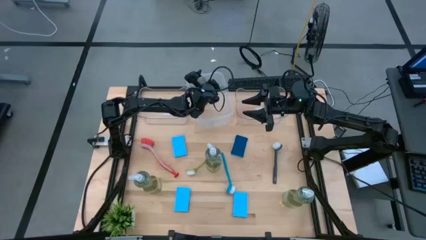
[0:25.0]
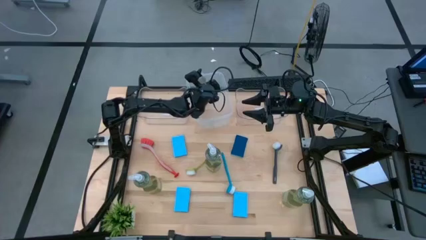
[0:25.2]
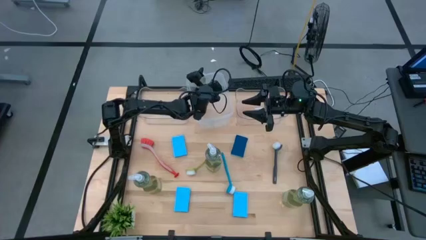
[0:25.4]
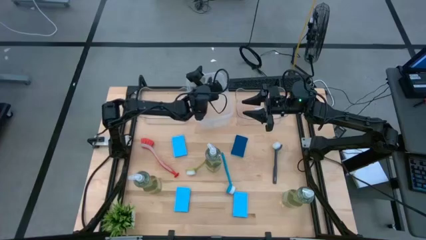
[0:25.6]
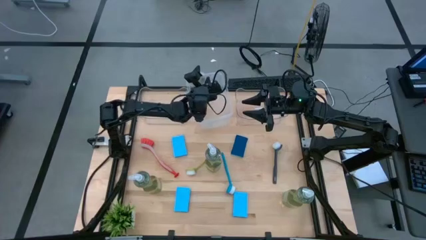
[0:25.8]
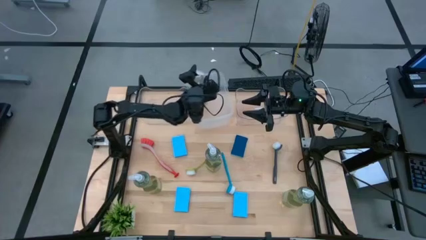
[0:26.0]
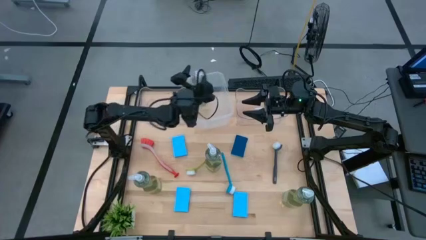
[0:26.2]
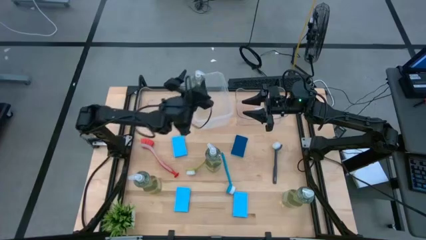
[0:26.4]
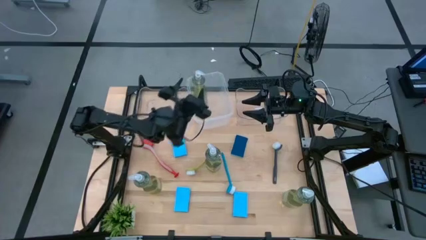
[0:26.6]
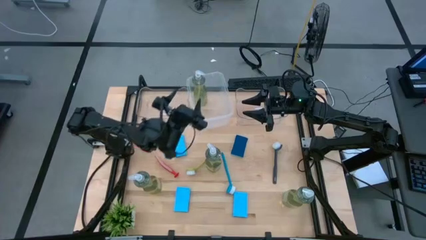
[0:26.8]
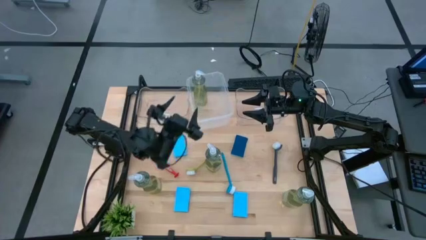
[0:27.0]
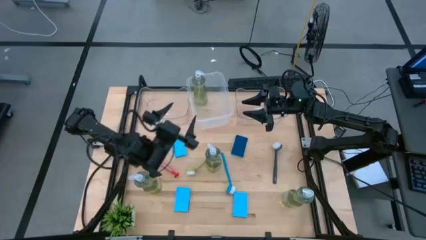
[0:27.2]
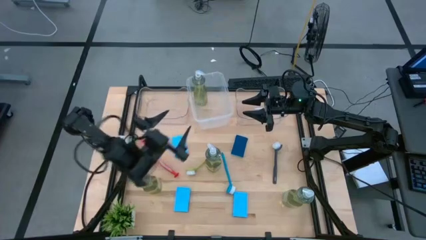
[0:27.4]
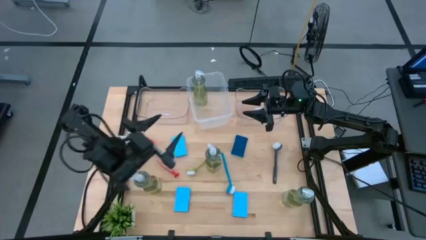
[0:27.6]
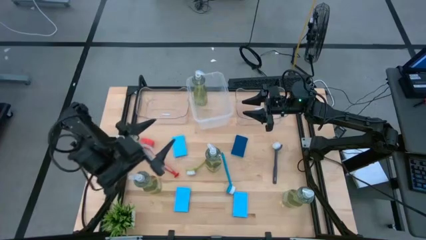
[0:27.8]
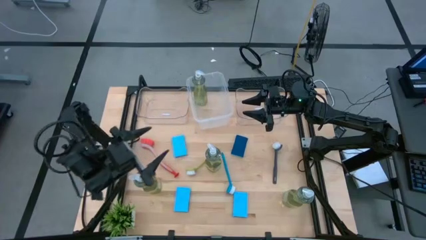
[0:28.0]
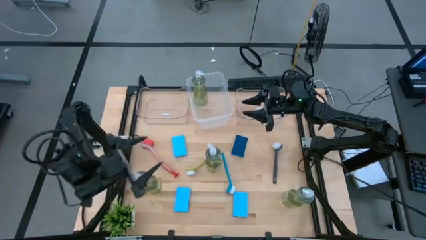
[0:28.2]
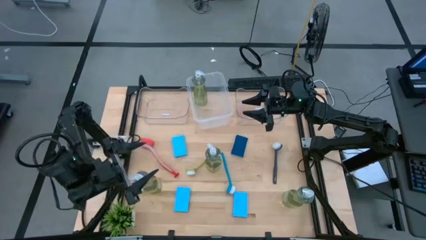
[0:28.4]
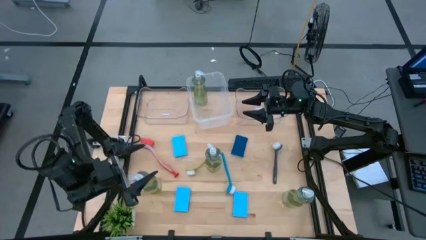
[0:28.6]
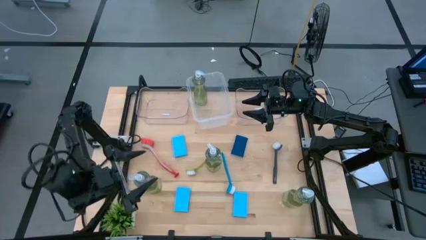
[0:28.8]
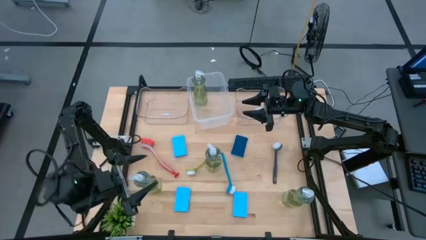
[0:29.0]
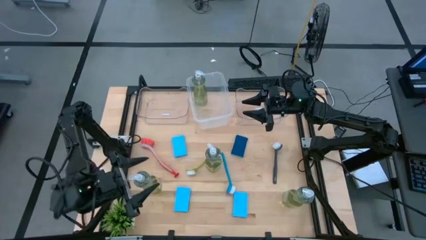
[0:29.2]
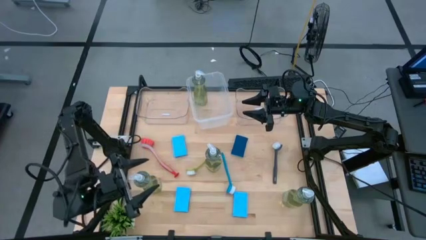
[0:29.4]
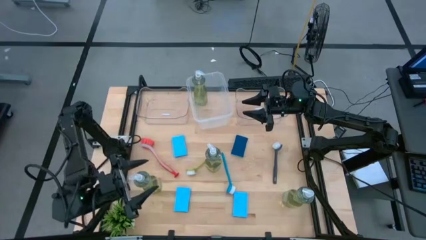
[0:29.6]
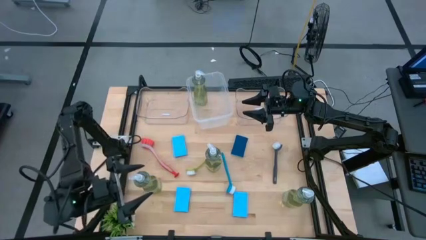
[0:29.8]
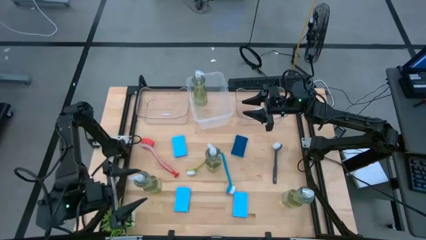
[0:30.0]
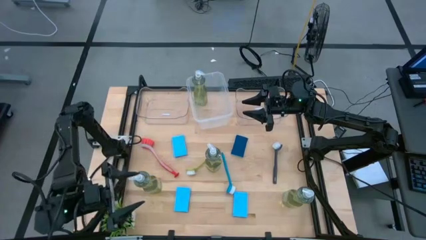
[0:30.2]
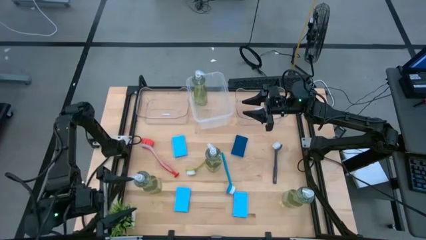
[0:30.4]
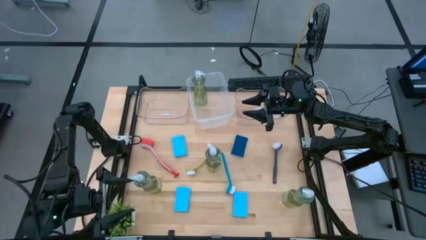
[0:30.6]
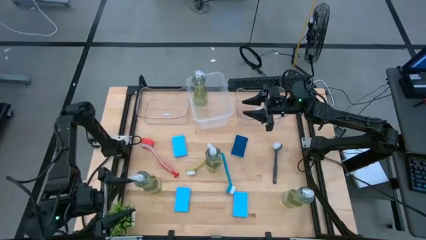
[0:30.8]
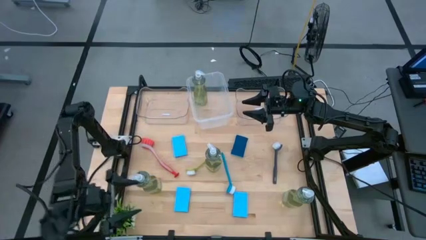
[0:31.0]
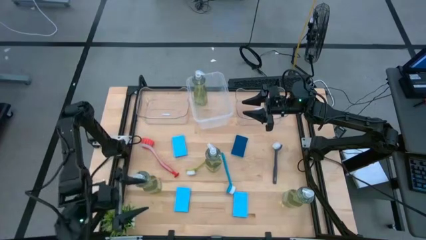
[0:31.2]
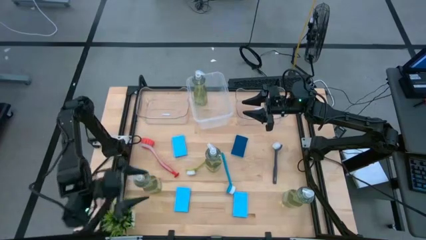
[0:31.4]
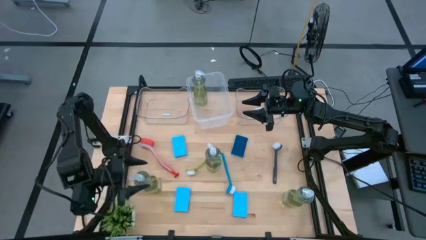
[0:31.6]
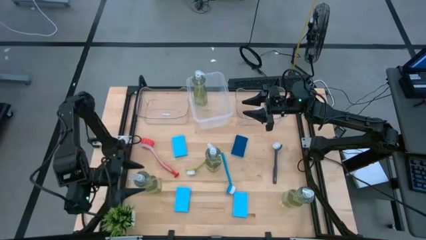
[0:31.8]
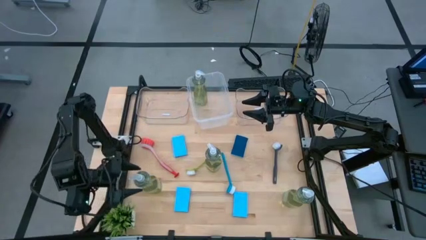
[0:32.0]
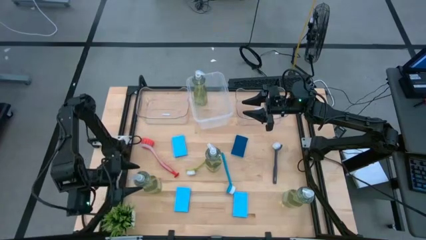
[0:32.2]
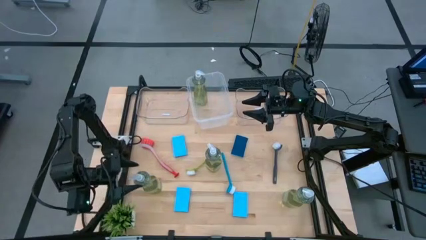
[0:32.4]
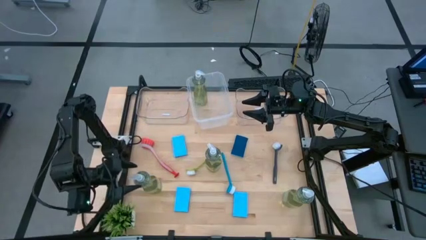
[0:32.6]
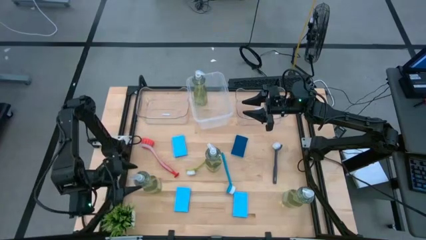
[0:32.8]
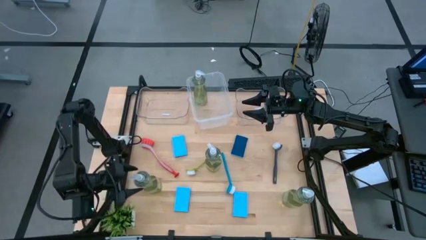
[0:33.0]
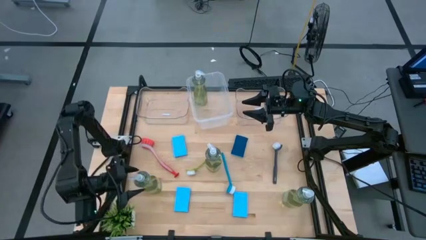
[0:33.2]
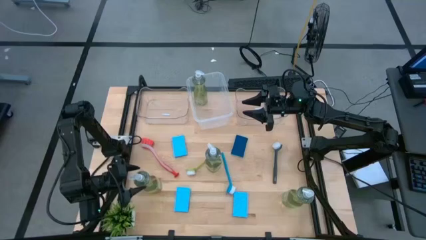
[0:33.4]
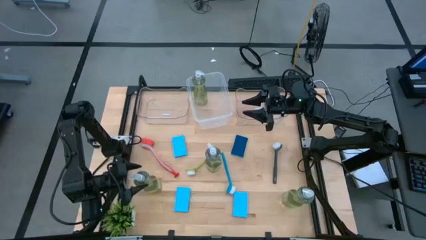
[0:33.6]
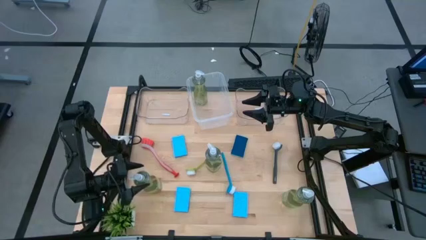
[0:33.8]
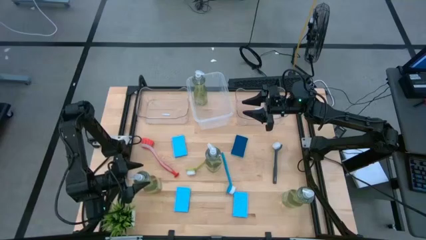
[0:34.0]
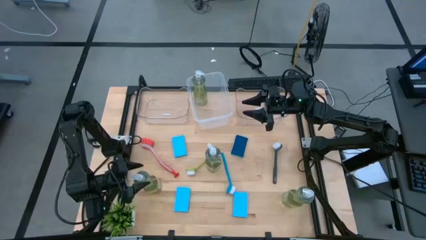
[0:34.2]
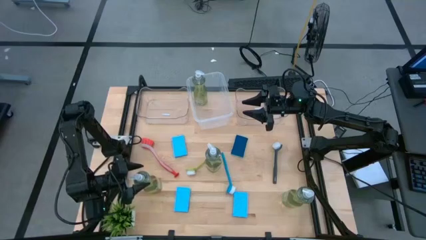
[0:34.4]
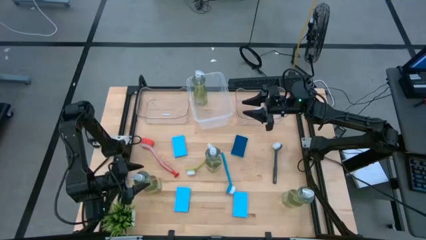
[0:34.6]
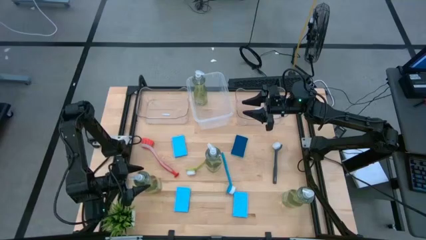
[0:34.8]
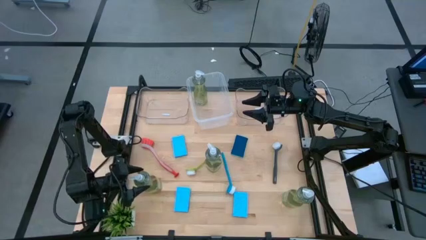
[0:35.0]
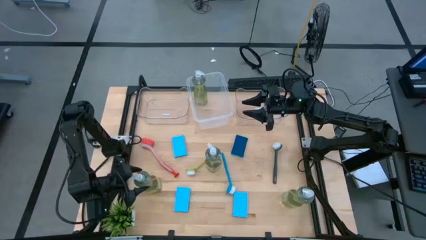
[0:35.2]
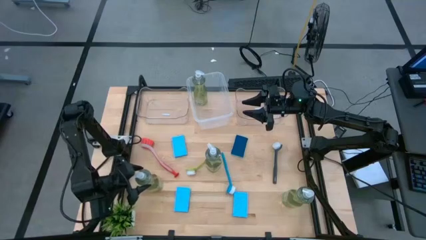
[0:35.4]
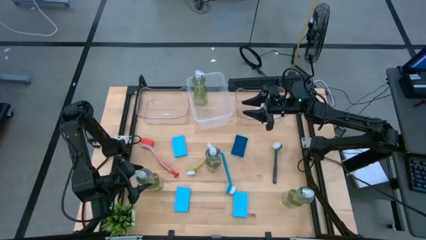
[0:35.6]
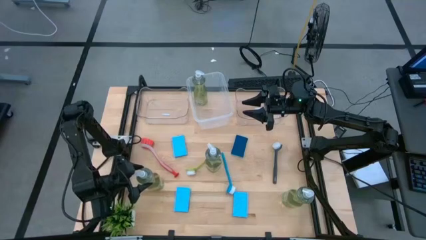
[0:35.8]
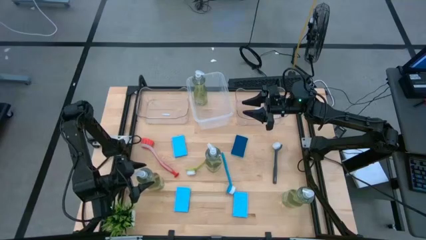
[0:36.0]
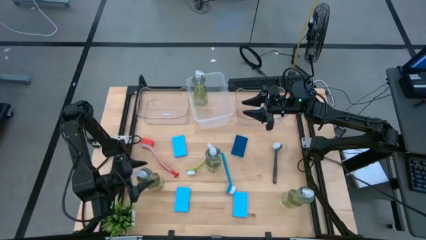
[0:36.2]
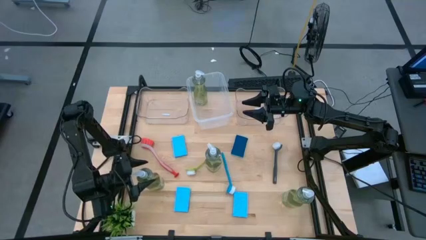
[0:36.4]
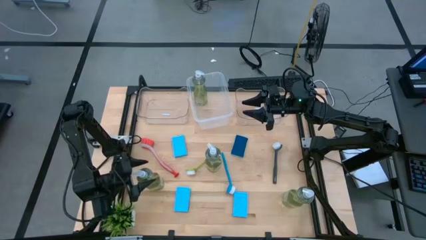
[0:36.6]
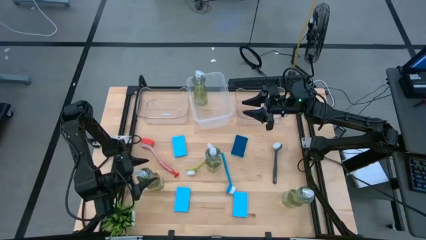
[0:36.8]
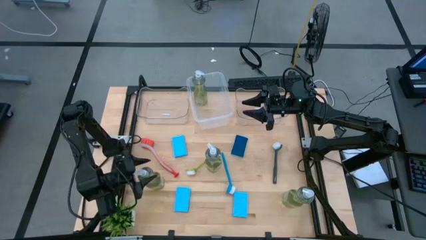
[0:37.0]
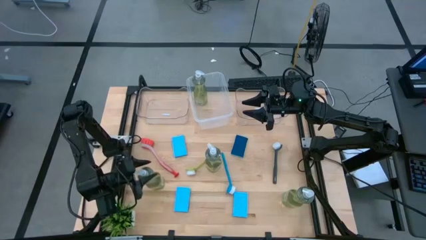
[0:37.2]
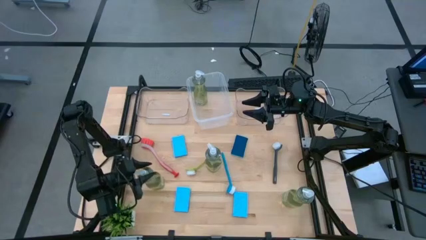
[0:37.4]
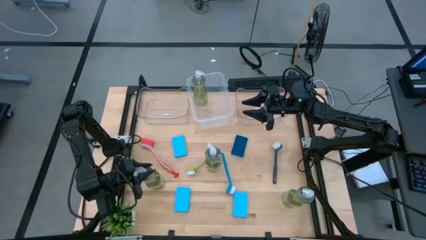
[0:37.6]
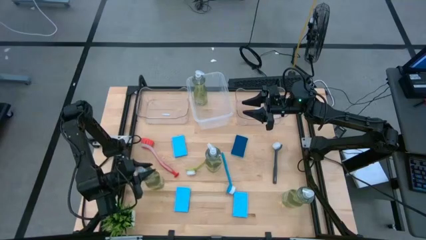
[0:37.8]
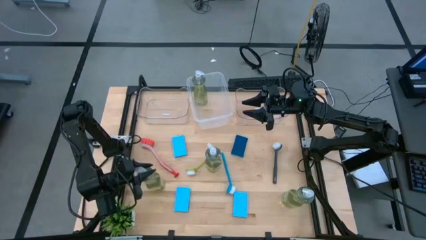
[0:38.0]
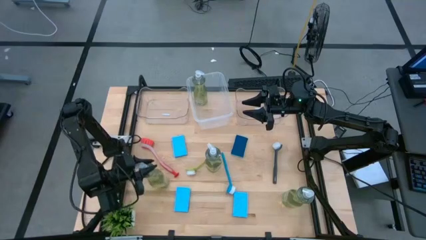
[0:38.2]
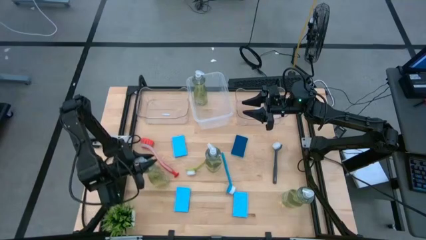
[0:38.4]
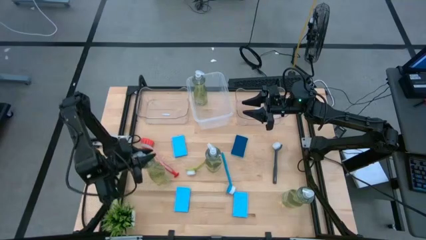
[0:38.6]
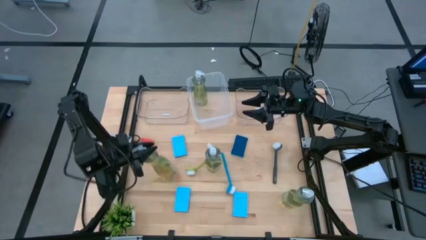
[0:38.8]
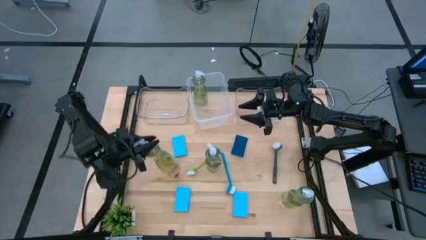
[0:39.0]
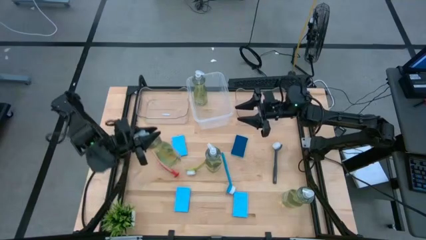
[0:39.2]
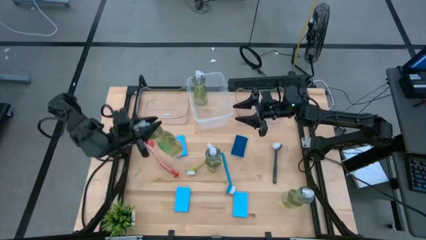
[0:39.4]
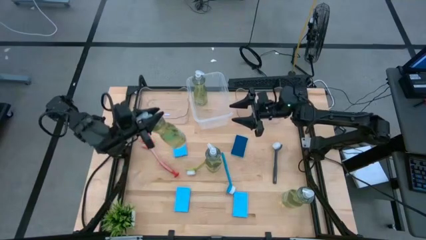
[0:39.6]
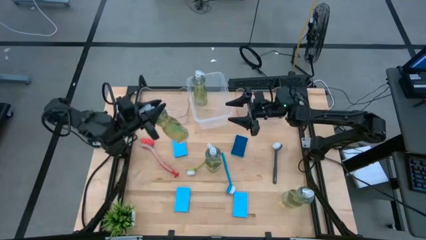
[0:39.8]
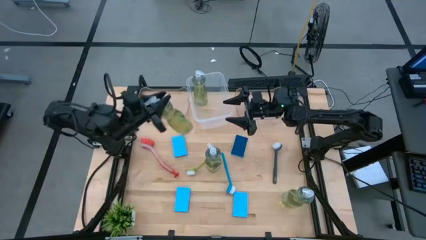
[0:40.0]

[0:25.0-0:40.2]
Task: Pick & Place Kitchen Sink Supplies
Put the green soap dispenser into the transparent white bin

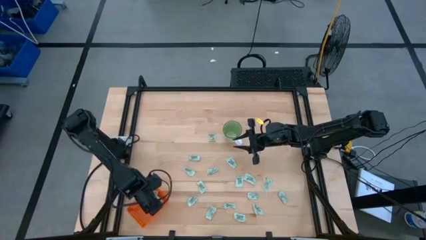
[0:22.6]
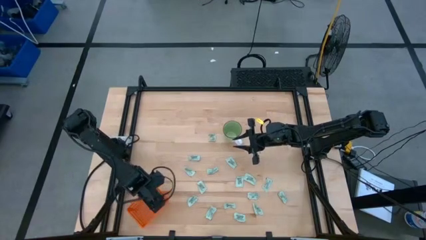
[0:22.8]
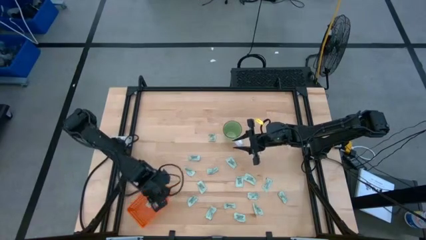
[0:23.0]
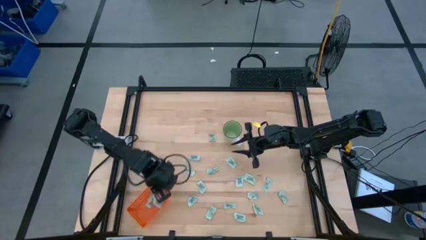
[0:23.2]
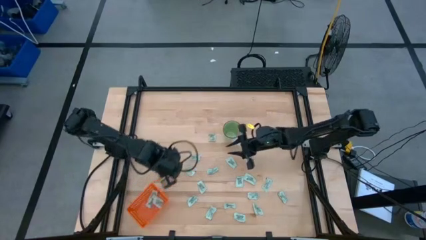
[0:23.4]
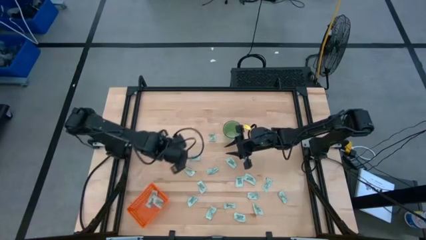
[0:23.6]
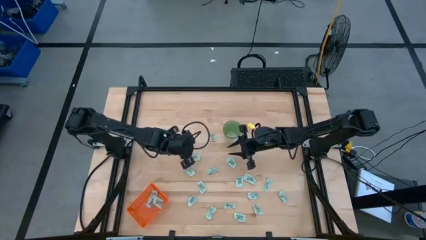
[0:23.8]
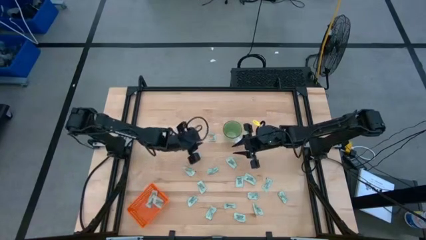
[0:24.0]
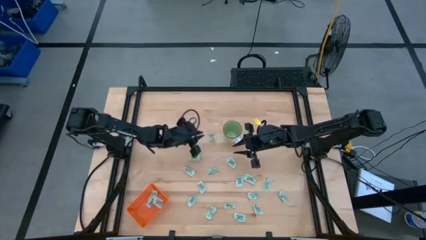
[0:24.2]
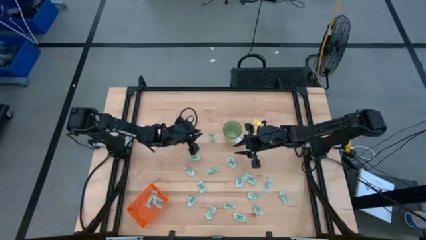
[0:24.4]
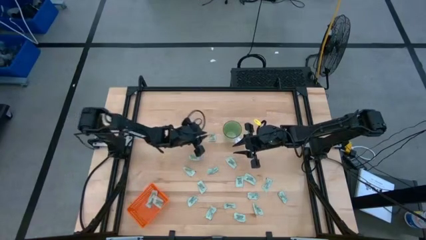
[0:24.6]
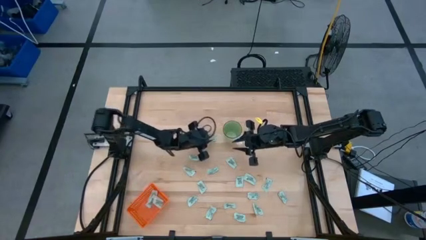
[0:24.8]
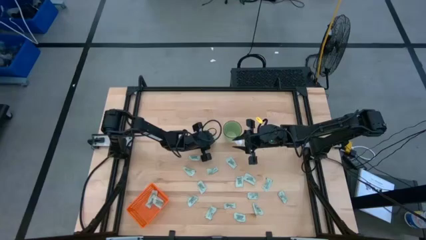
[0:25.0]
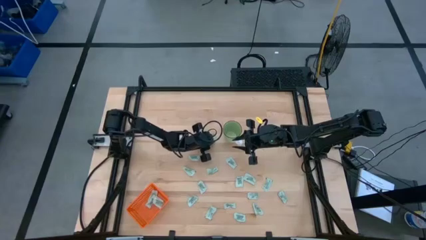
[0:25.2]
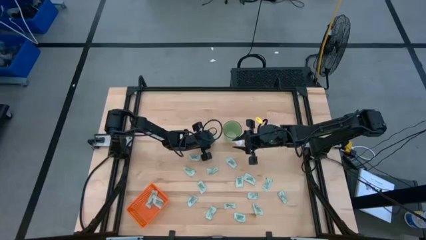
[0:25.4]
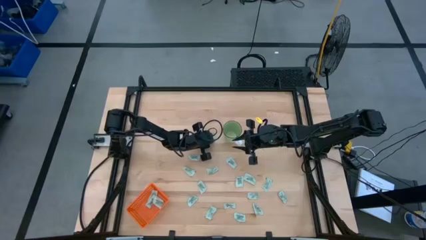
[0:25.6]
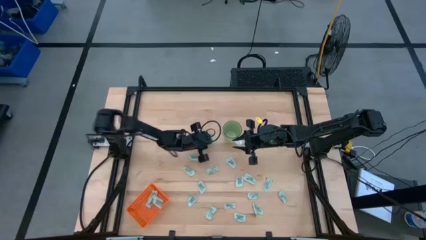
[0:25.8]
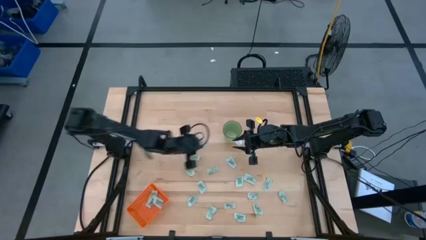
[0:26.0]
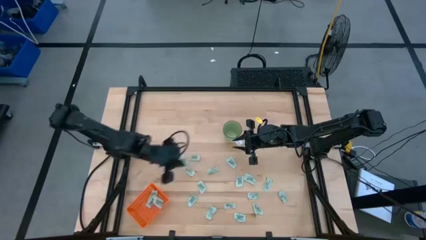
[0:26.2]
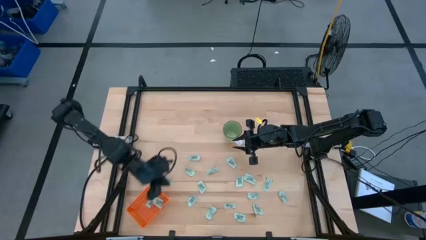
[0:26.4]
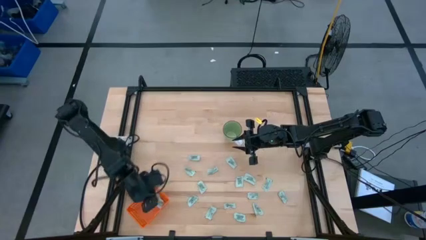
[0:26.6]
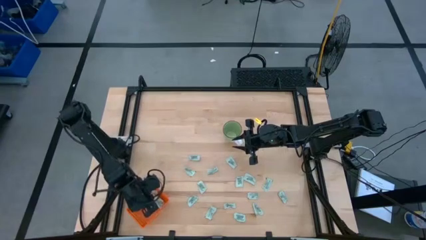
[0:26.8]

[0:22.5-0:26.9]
Task: Pick and place Stevia / Truvia into bins
Put the light green stevia packet into the orange basket
